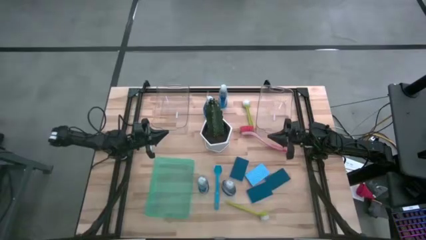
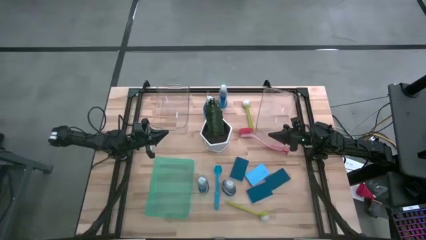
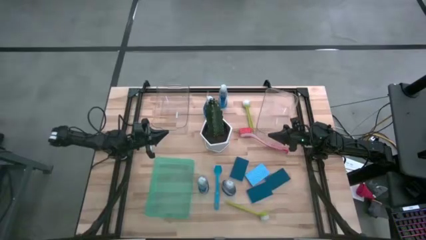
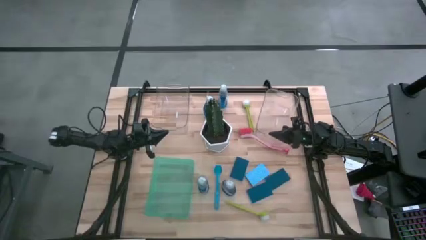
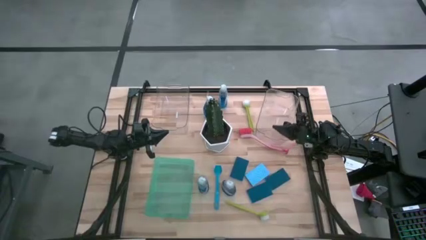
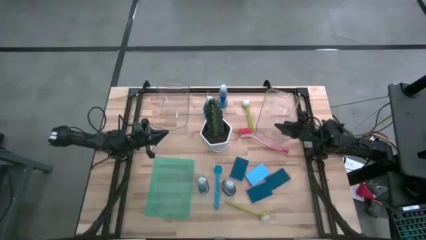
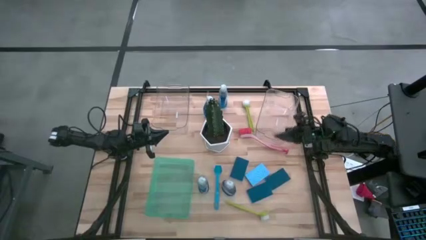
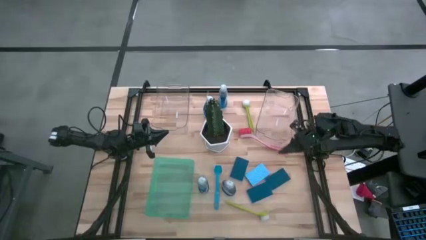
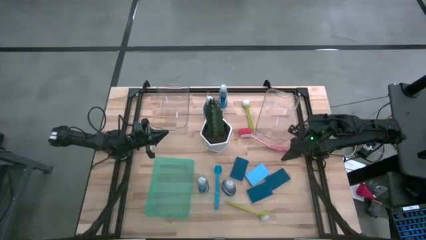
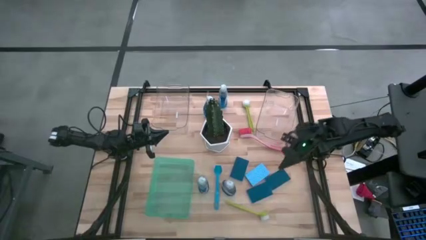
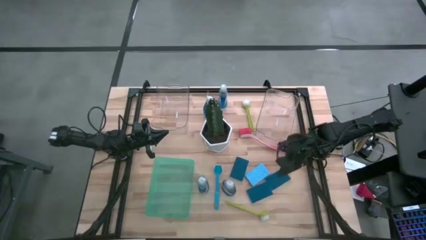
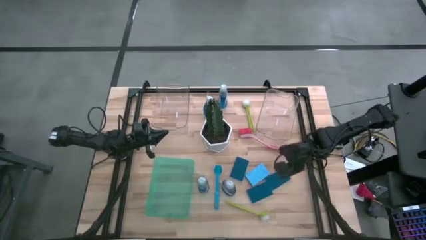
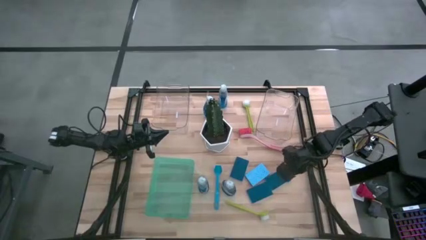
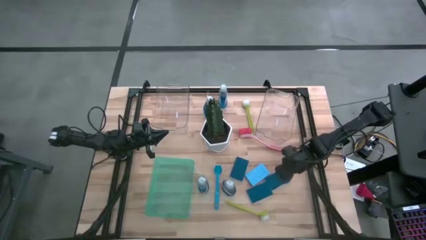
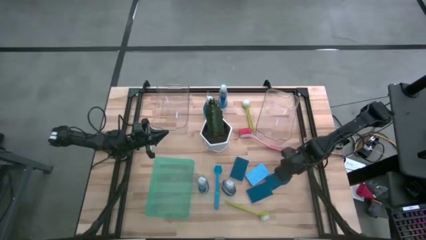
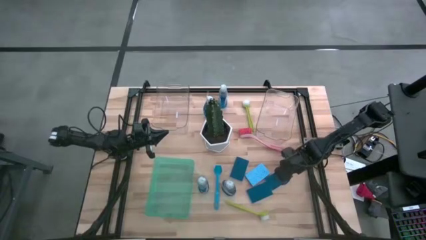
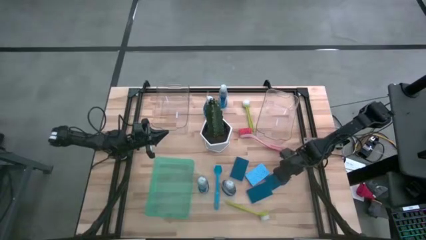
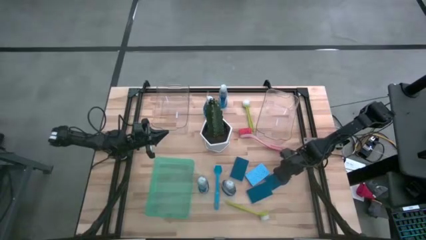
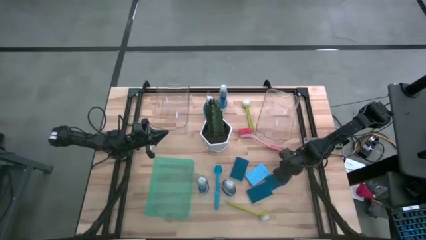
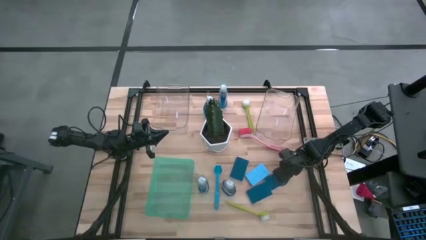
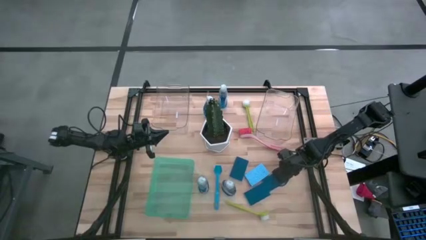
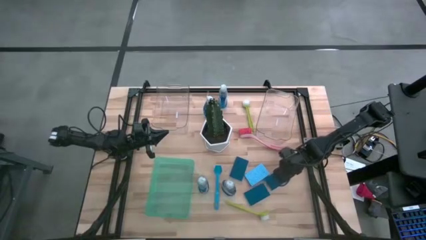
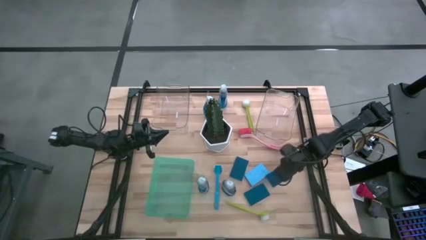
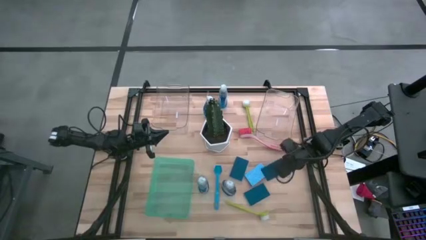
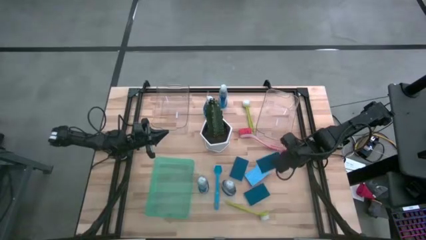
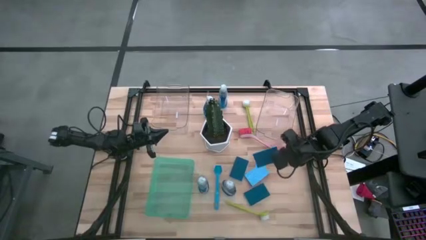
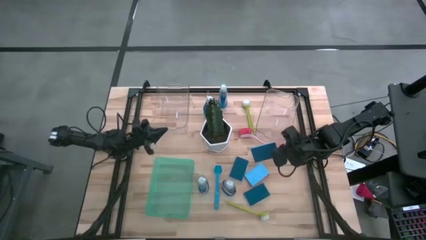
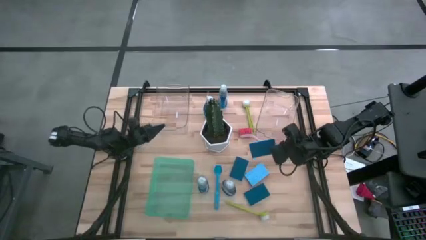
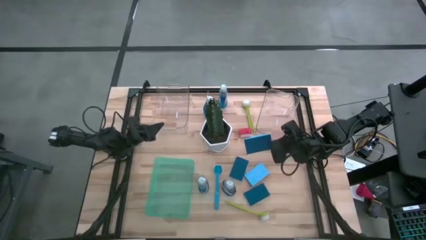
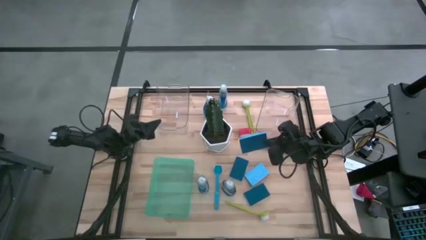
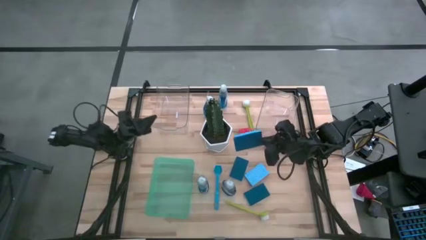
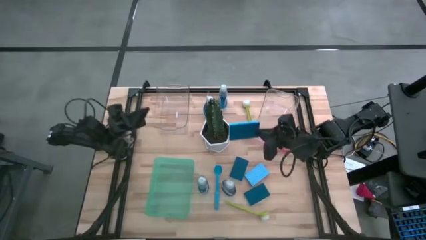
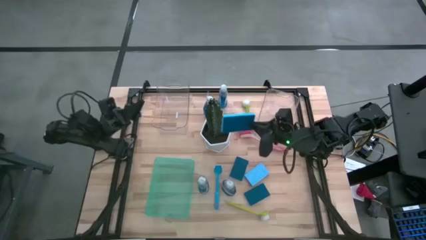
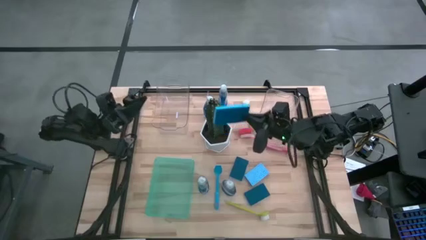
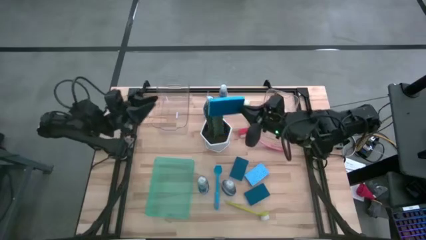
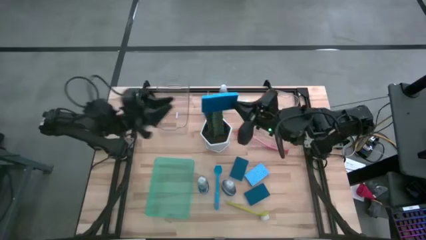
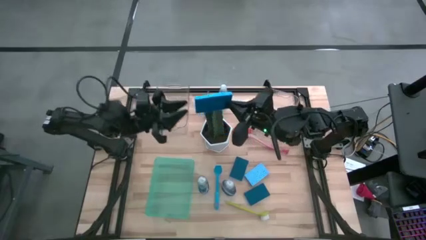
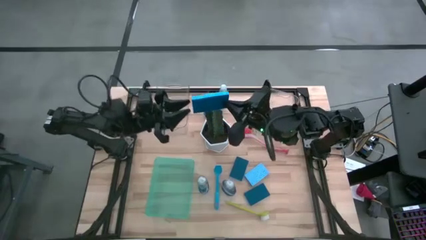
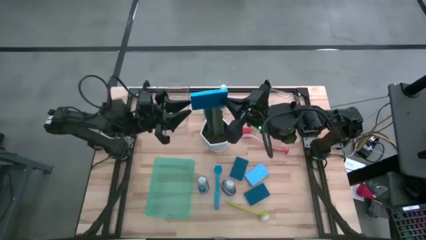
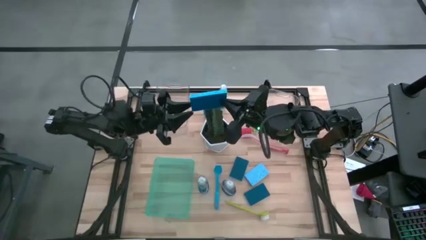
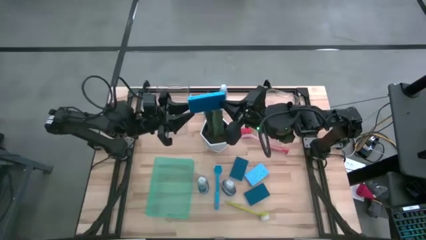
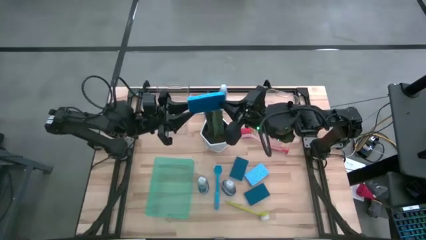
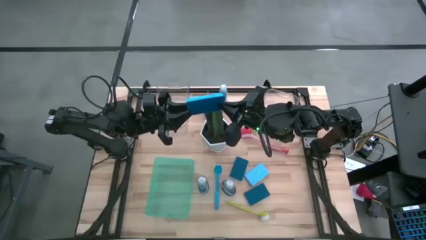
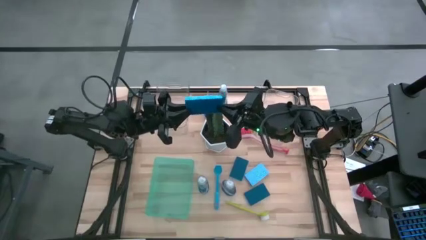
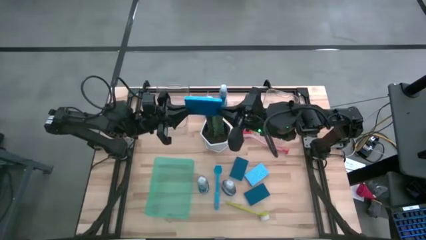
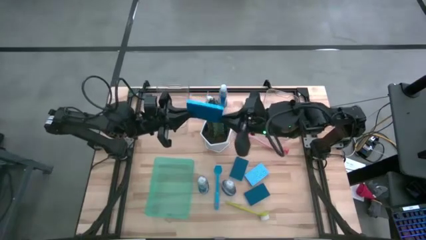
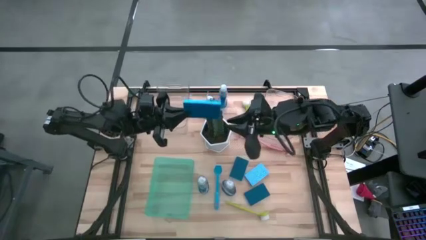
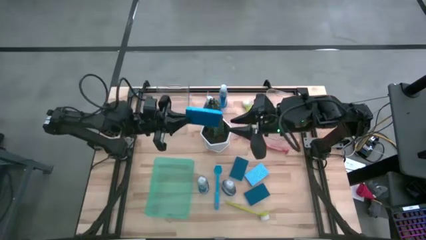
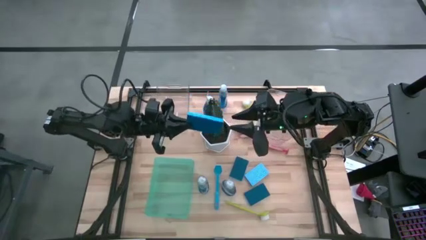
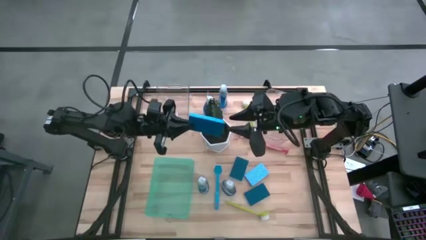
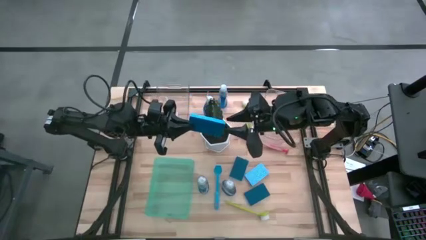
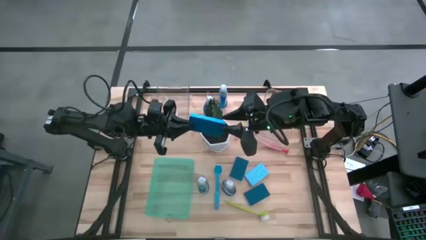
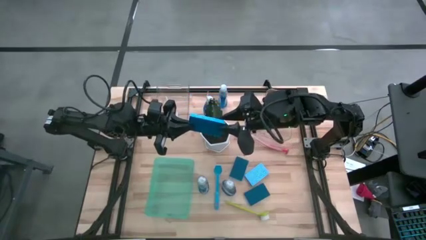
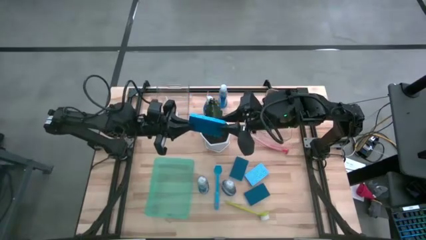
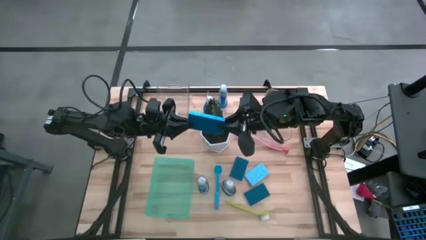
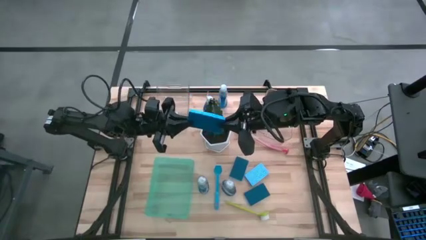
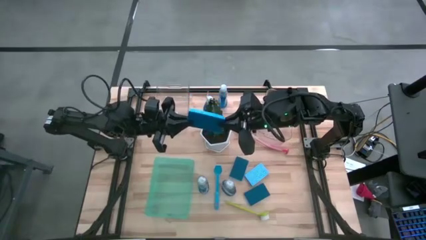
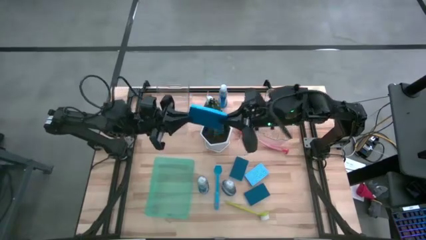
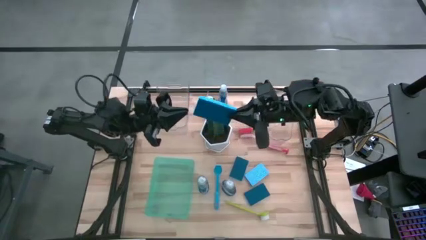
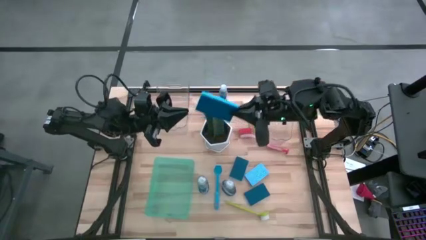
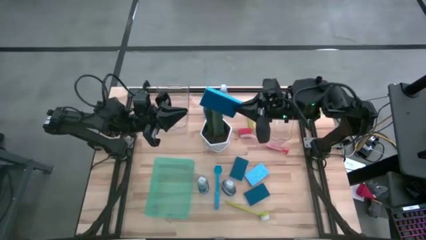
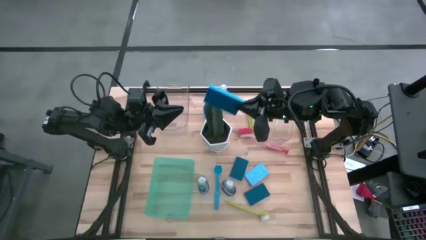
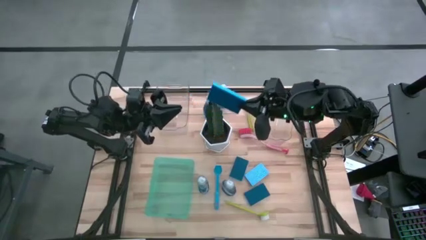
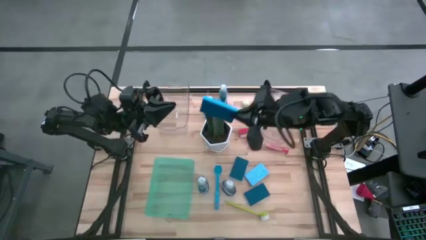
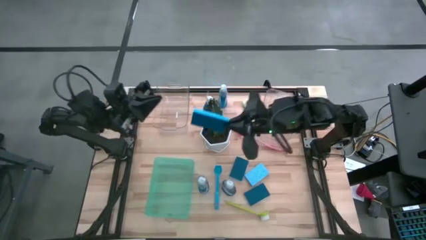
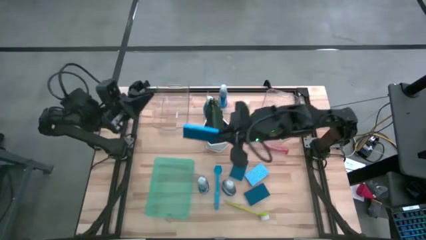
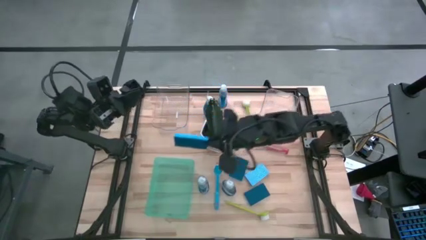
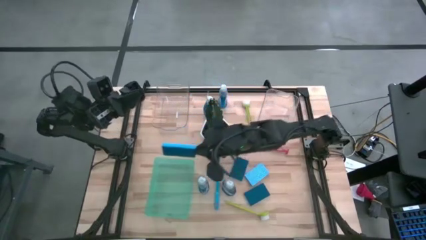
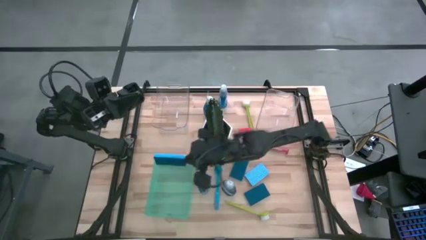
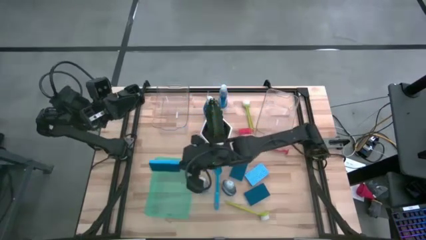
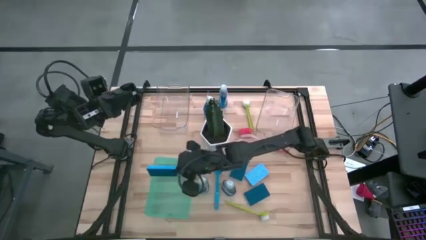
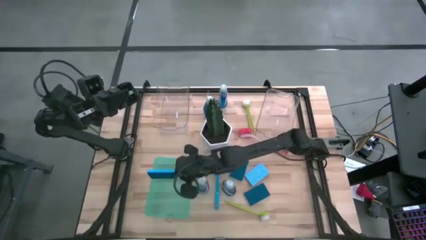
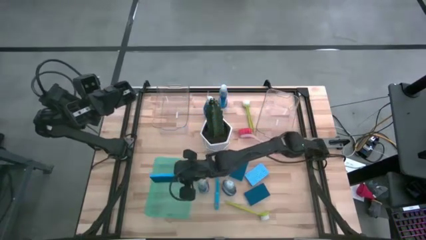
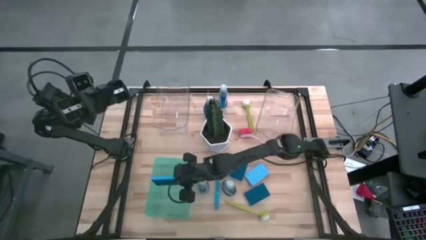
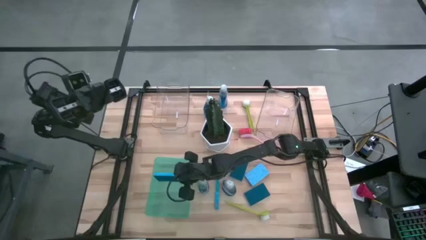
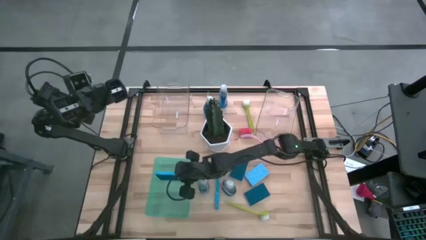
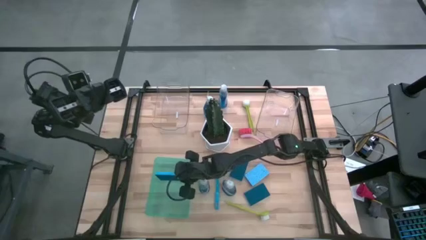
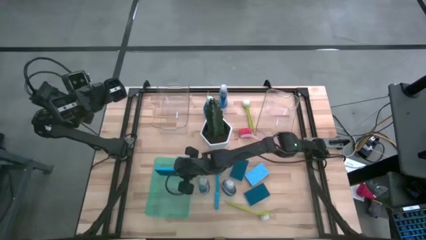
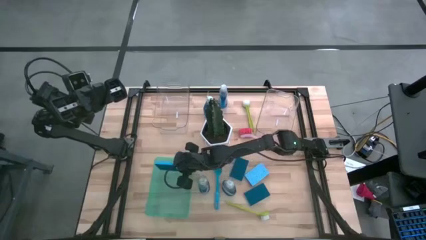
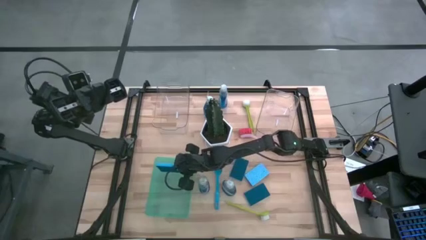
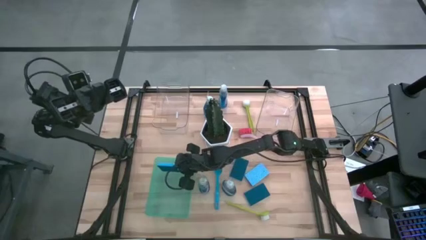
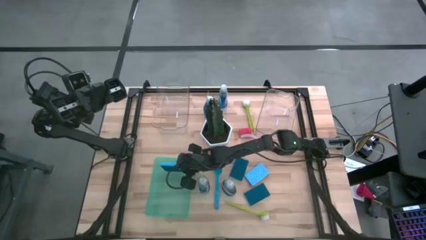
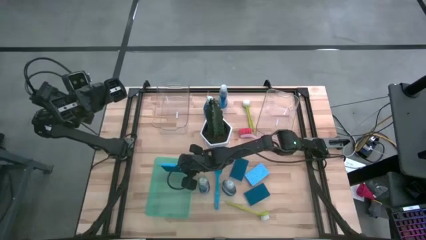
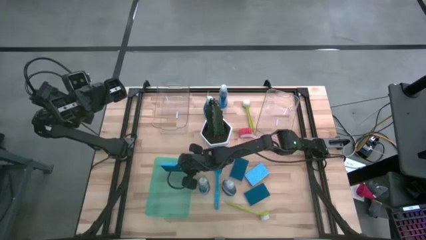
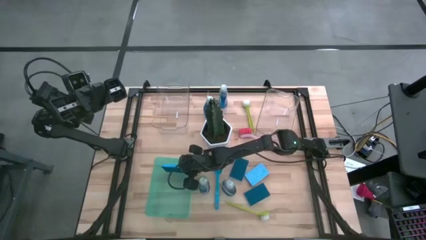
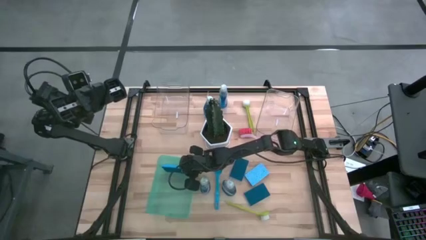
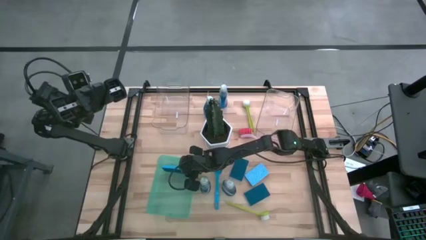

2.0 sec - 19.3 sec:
Task: Pick & Place Kitchen Sink Supplies
Put the blue sponge wipe into the green bin
